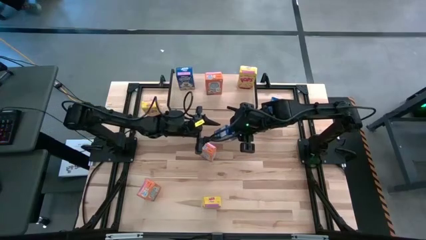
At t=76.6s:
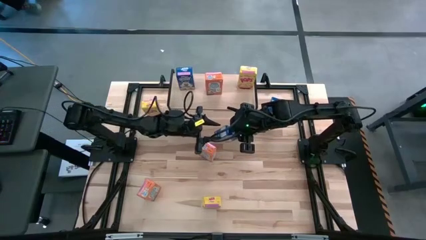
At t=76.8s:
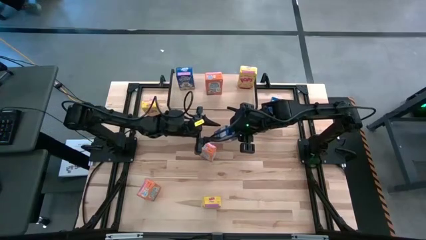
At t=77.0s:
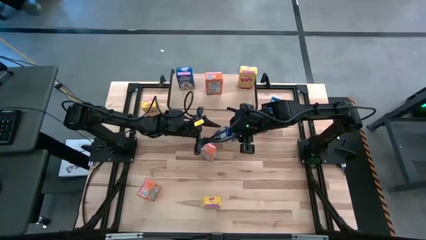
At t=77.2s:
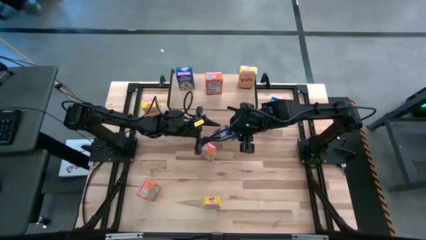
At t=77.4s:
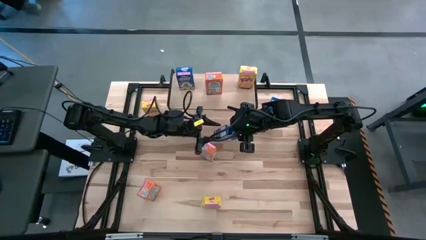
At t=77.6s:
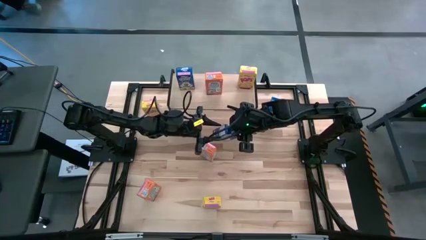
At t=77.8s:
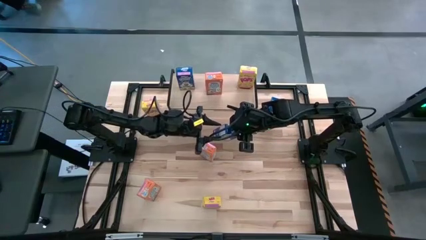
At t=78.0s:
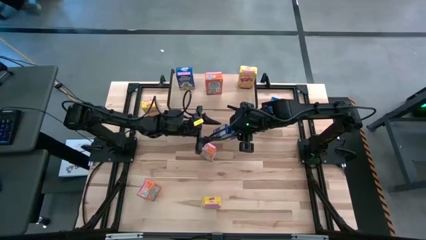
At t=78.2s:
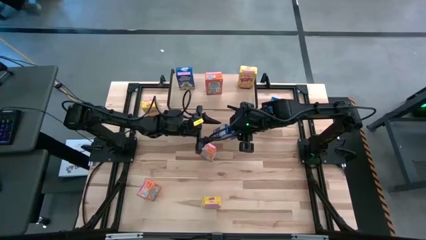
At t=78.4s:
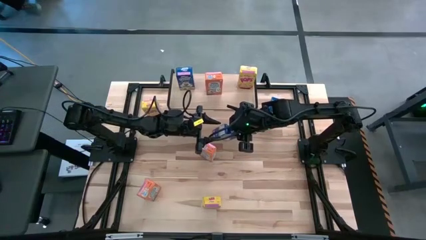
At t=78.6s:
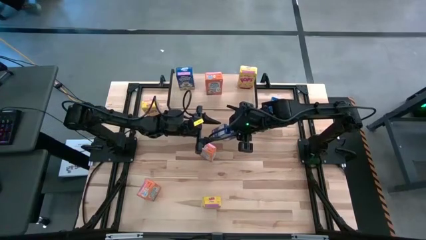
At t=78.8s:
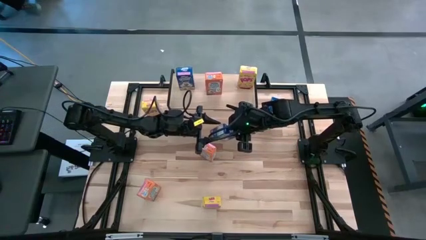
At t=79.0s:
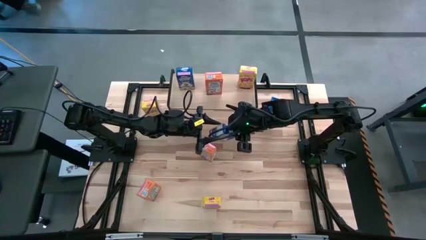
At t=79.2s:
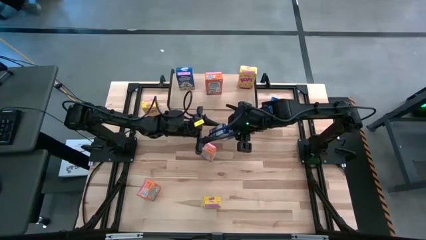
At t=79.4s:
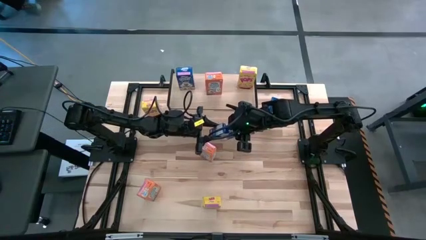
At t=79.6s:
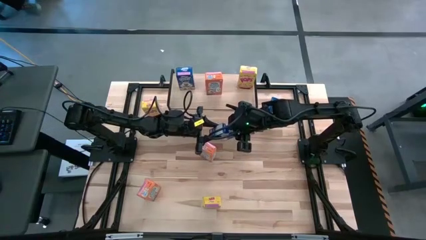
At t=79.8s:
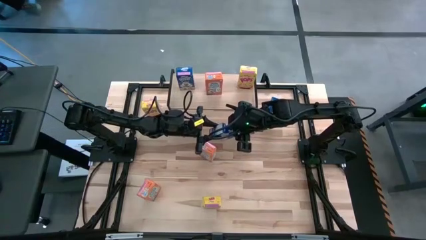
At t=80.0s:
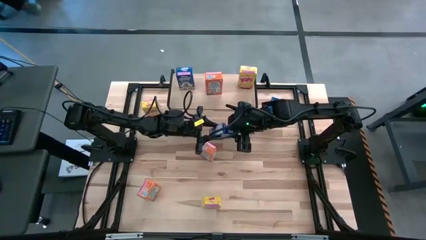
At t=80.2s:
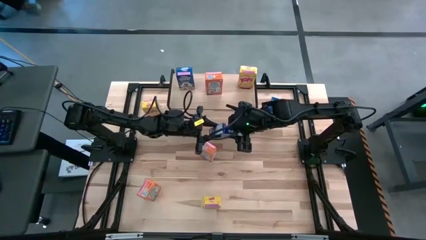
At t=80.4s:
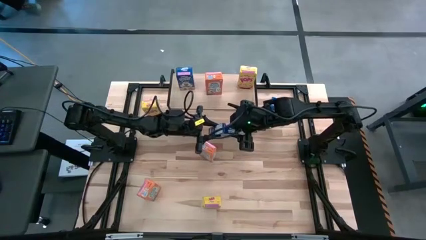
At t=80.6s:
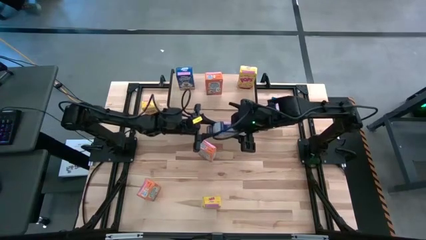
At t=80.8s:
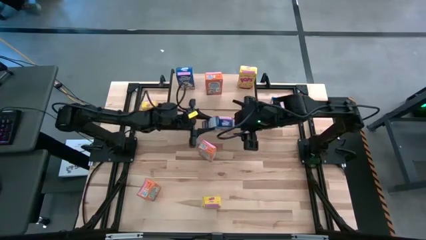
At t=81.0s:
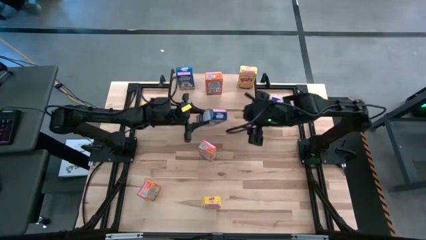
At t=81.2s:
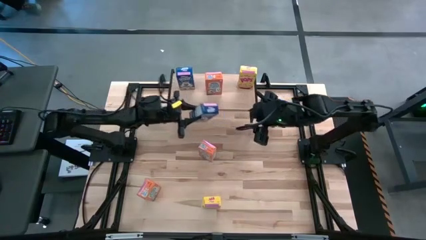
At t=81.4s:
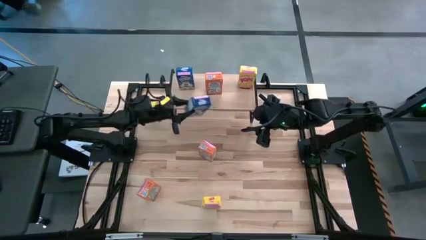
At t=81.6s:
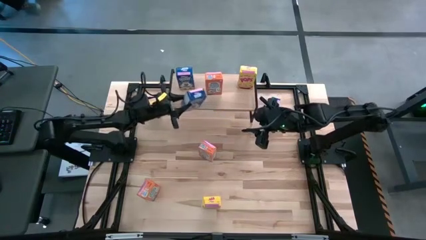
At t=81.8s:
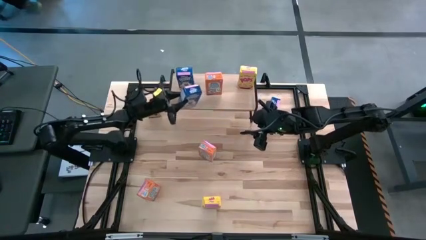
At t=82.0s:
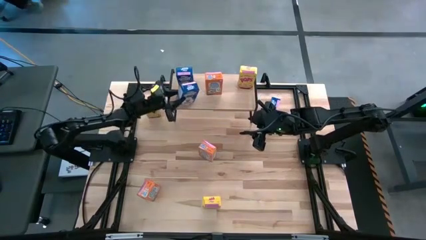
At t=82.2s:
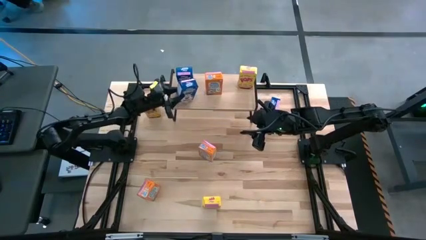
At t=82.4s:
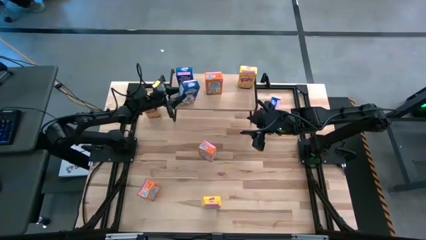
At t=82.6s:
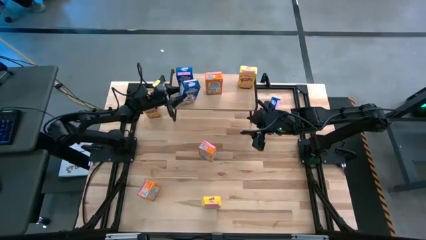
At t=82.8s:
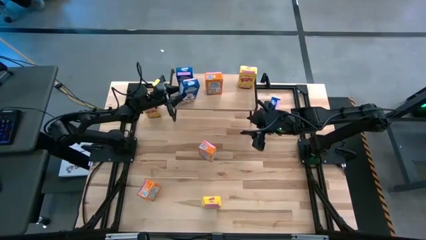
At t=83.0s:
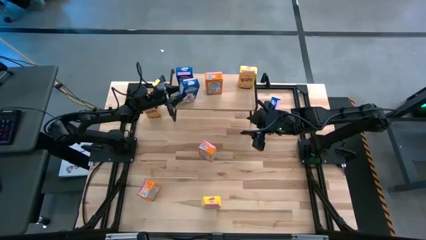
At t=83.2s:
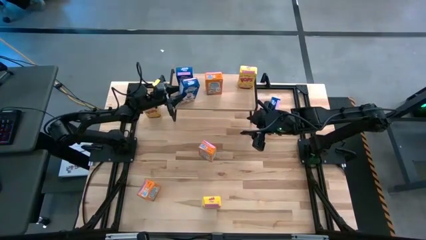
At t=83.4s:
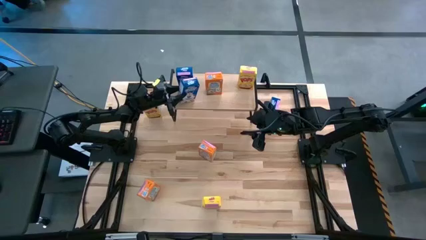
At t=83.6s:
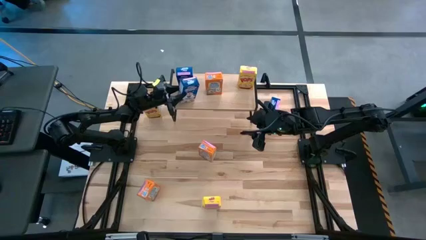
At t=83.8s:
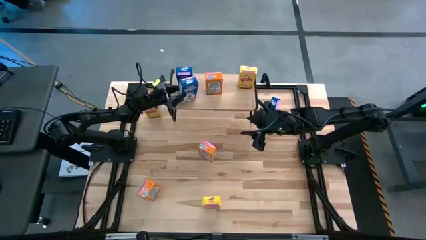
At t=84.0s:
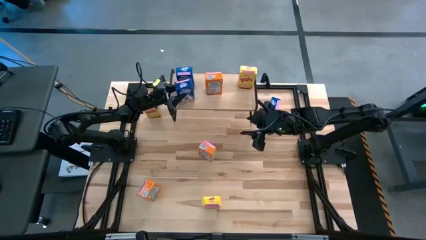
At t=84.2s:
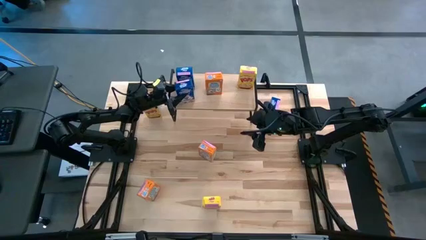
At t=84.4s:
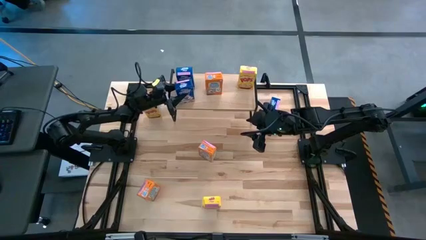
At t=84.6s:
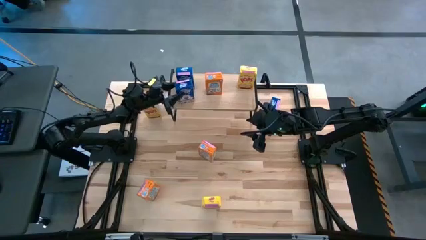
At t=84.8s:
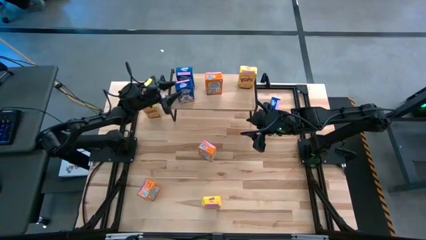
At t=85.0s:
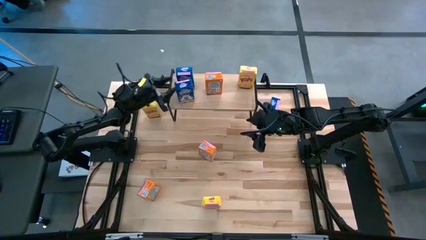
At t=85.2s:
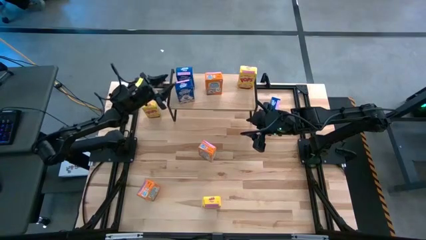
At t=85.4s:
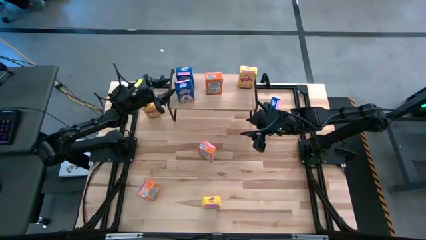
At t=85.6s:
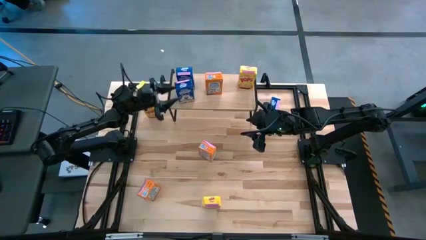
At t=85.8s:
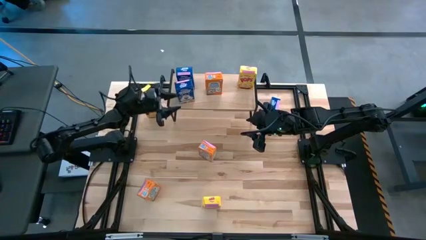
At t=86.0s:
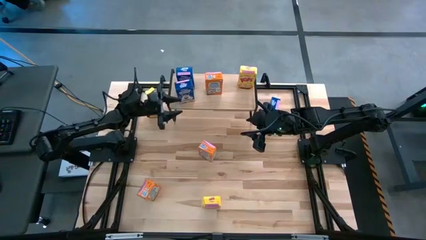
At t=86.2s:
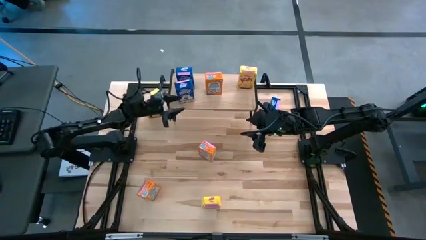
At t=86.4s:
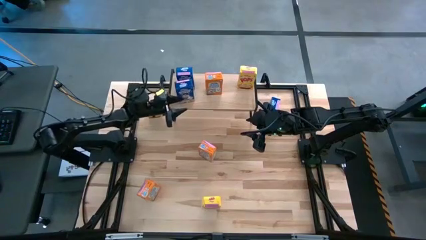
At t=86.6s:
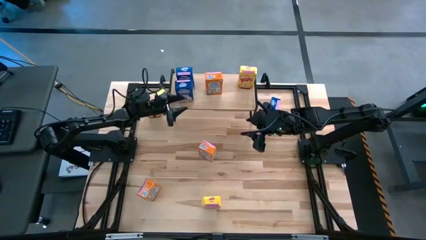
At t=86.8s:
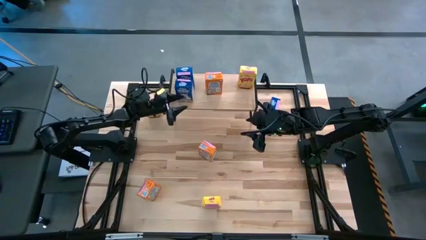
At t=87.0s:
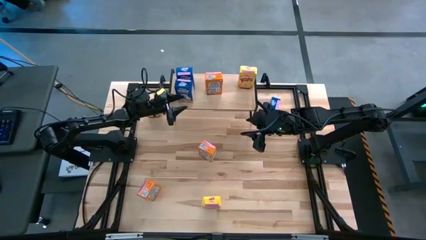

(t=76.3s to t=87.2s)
Task: Stack cereal on shelf
Put the bottom blue cereal box aligned with the other blue cereal box on the shelf

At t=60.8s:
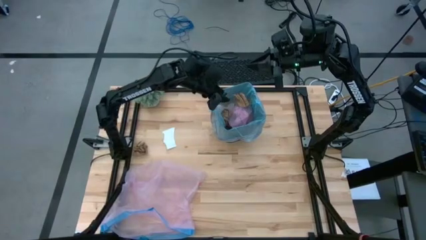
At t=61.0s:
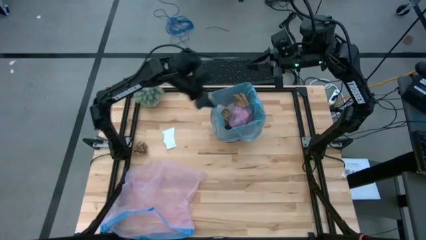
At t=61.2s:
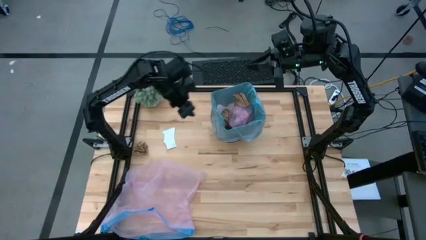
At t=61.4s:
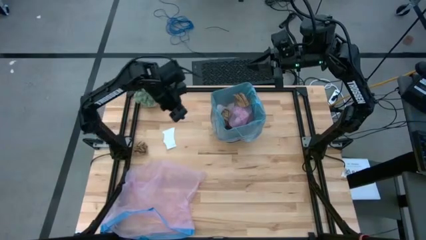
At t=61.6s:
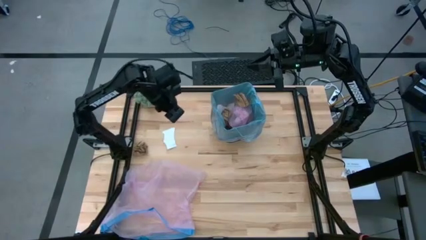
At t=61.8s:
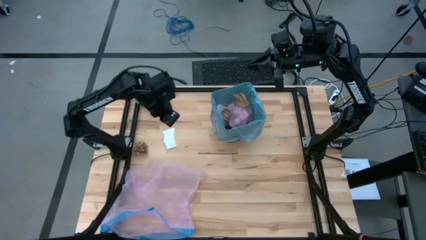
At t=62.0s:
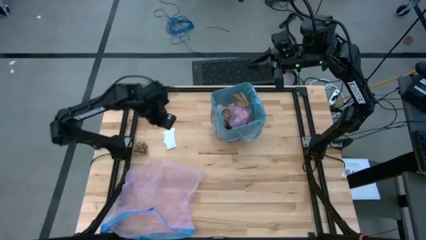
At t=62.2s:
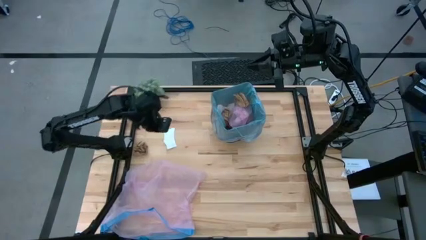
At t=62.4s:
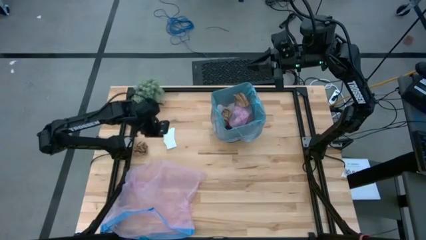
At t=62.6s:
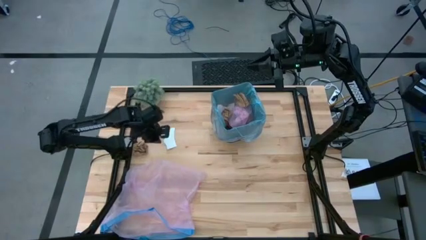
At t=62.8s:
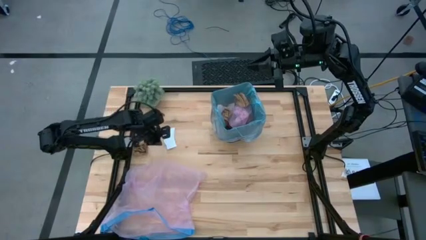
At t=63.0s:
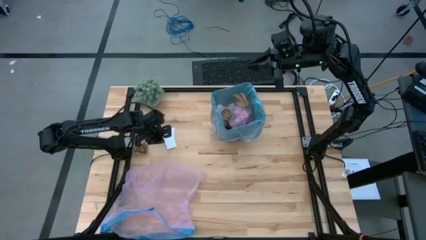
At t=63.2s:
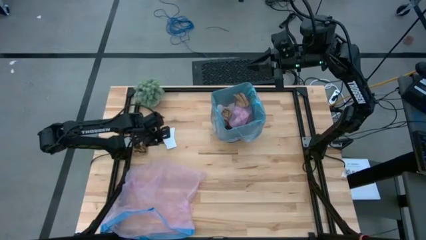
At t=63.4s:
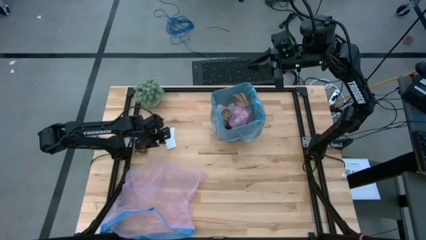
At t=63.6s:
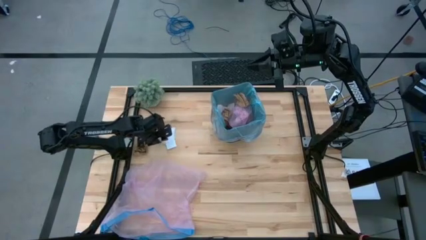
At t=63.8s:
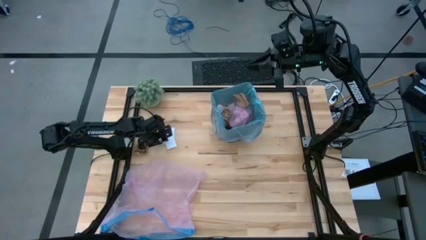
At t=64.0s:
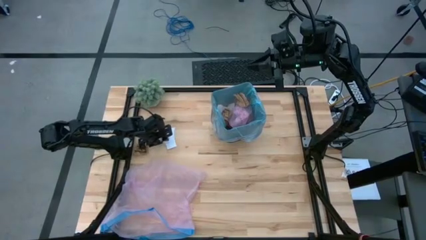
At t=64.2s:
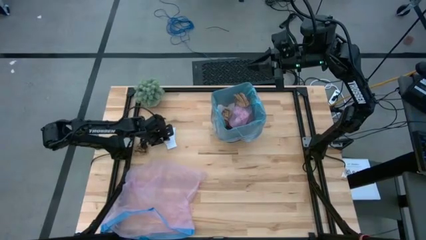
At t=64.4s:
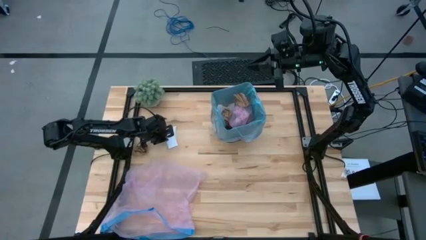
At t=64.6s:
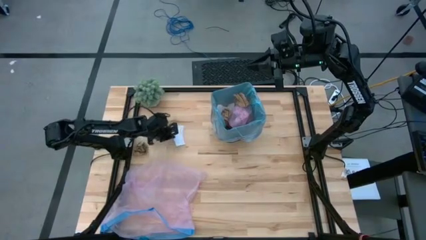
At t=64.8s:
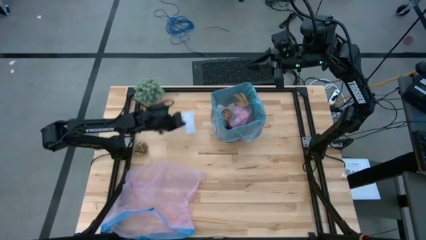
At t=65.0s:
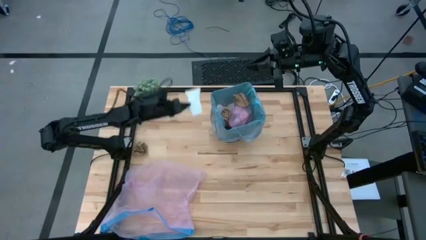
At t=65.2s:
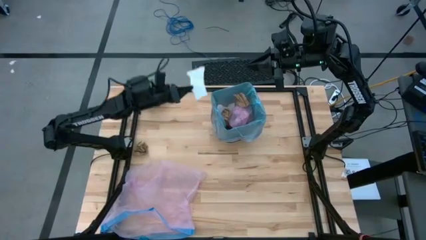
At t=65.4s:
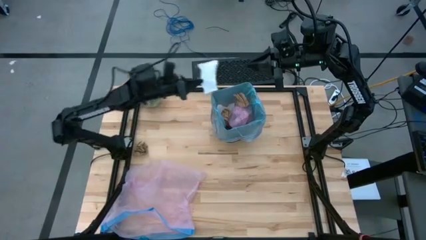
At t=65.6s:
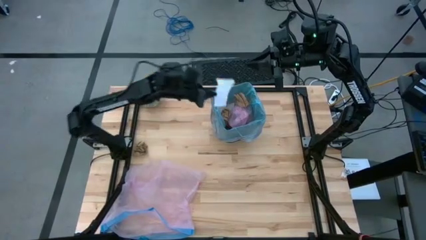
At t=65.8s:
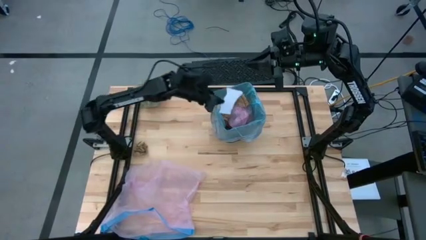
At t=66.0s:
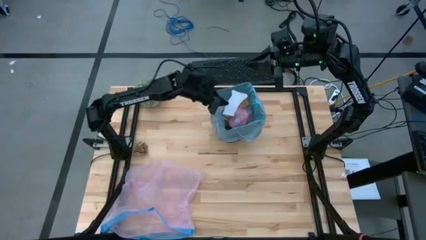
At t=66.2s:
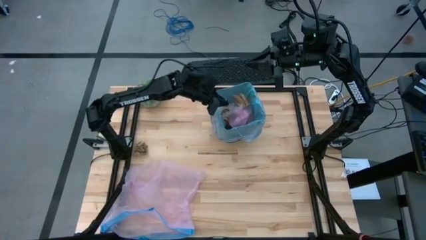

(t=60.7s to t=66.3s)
Task: place trash/remove bag and relplace
Put the white paper into the trash bin
